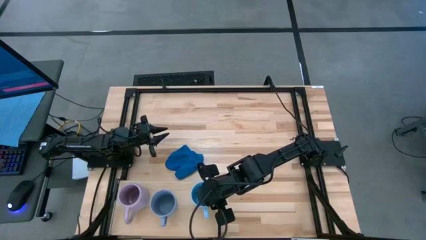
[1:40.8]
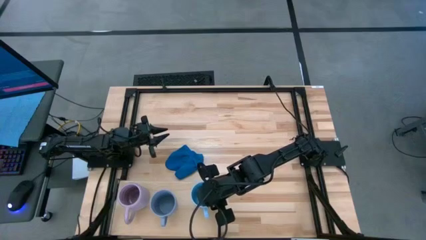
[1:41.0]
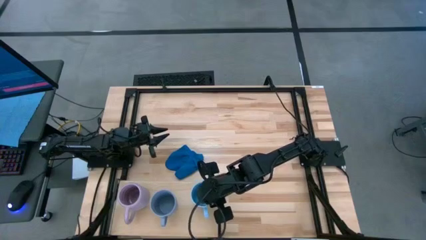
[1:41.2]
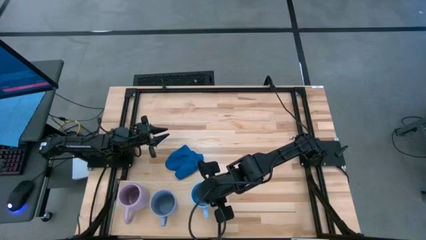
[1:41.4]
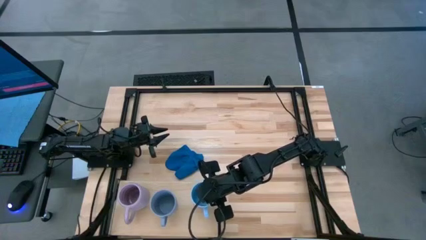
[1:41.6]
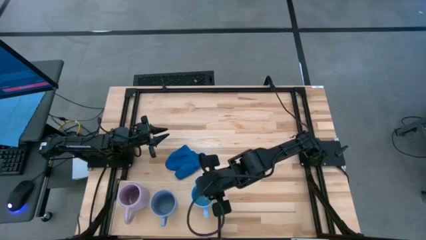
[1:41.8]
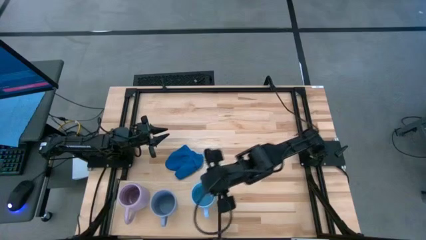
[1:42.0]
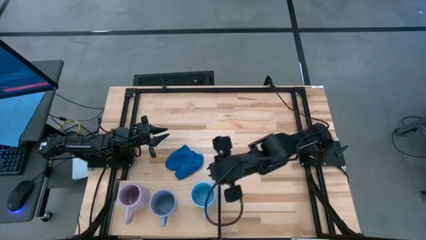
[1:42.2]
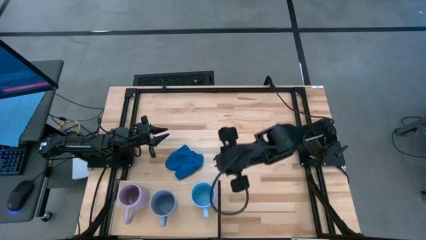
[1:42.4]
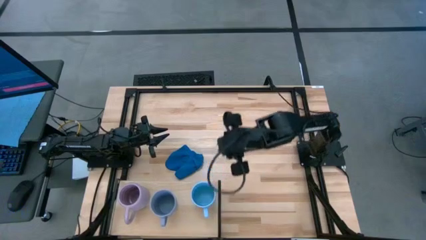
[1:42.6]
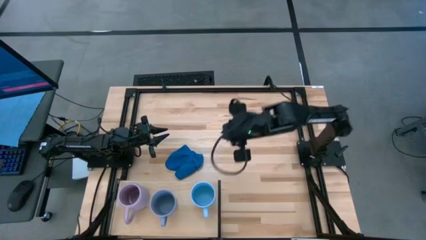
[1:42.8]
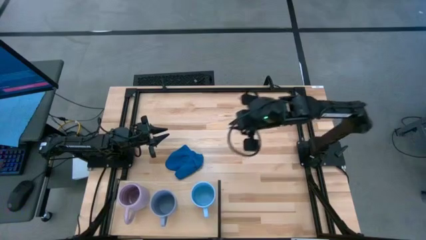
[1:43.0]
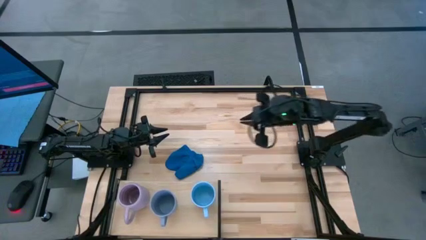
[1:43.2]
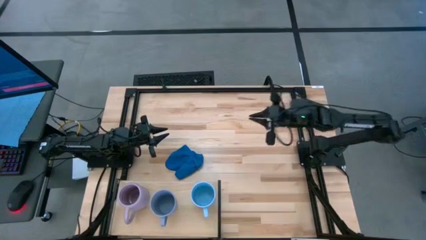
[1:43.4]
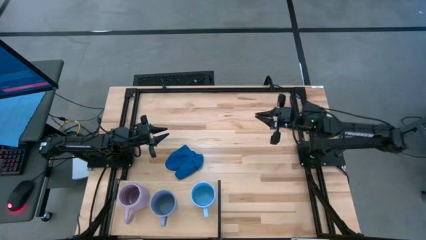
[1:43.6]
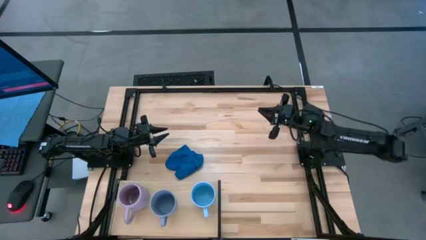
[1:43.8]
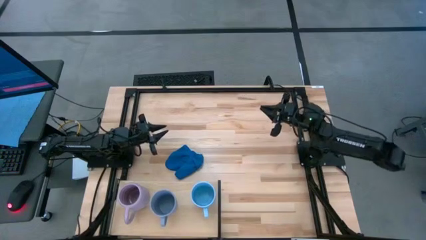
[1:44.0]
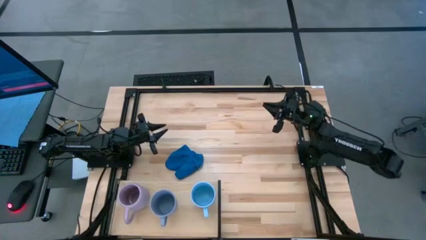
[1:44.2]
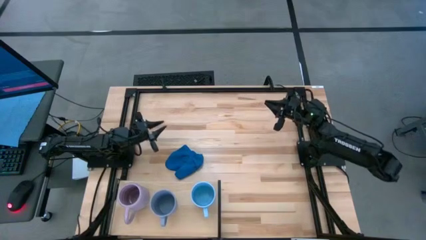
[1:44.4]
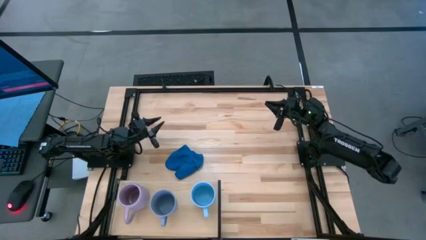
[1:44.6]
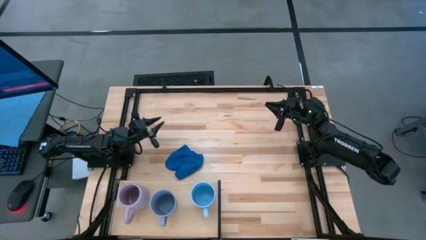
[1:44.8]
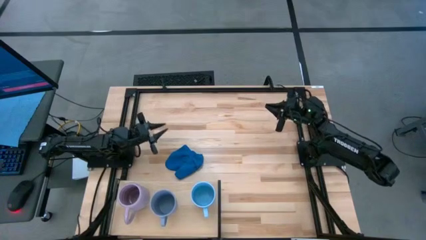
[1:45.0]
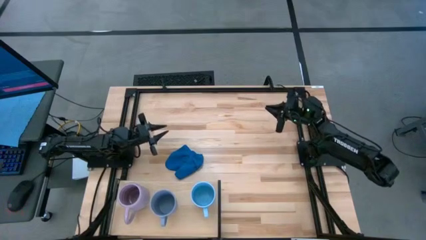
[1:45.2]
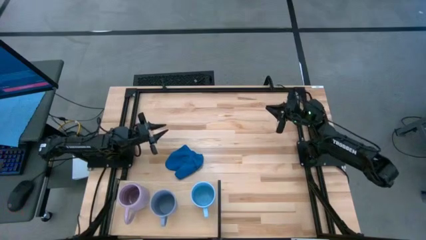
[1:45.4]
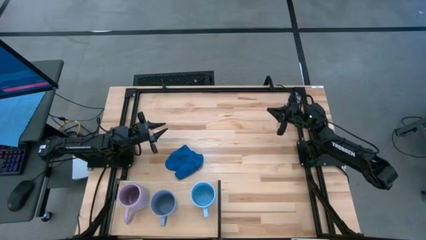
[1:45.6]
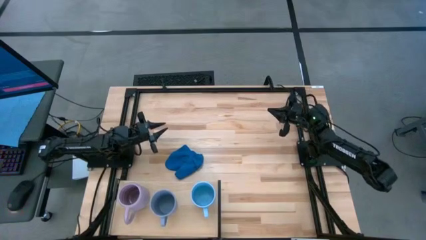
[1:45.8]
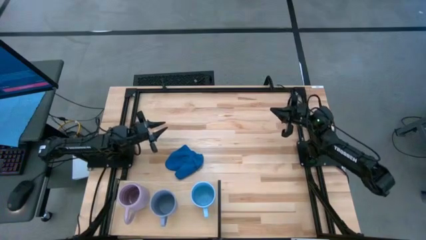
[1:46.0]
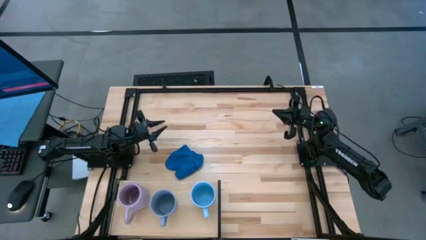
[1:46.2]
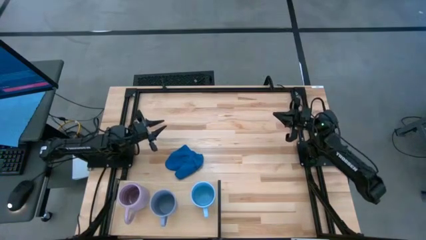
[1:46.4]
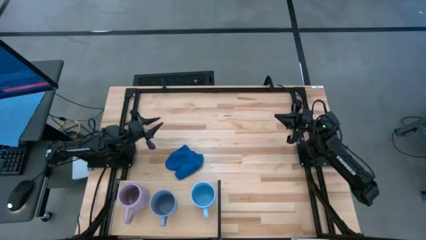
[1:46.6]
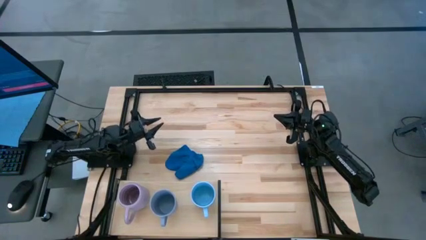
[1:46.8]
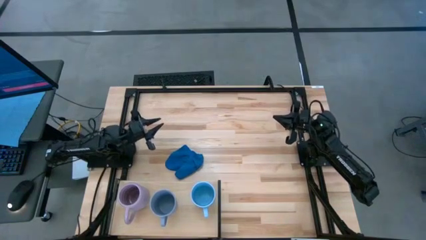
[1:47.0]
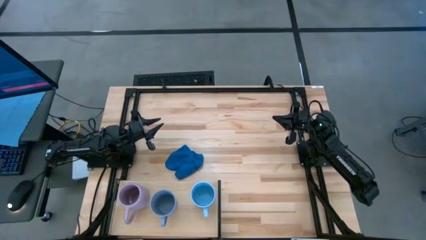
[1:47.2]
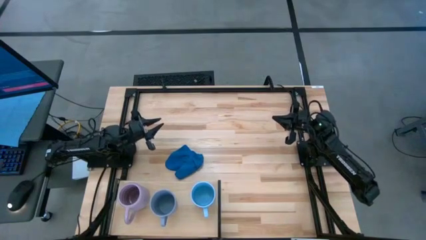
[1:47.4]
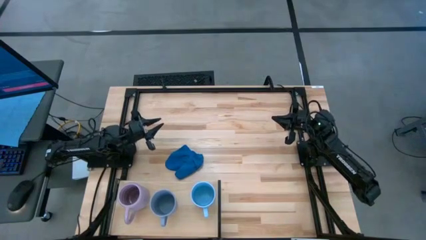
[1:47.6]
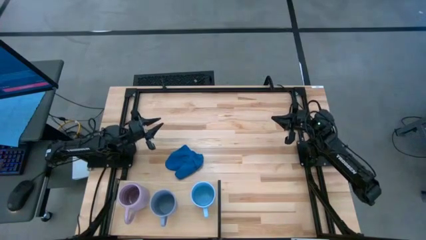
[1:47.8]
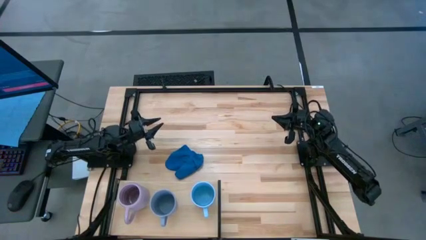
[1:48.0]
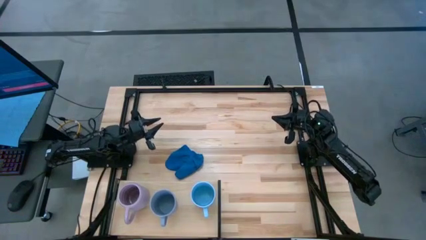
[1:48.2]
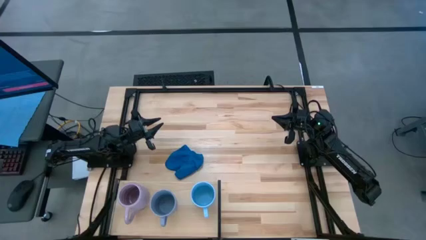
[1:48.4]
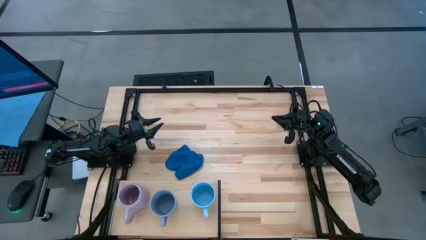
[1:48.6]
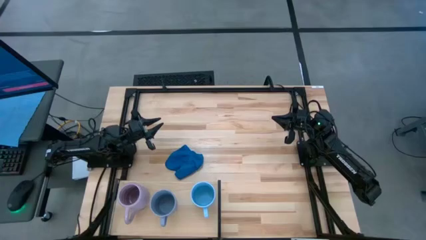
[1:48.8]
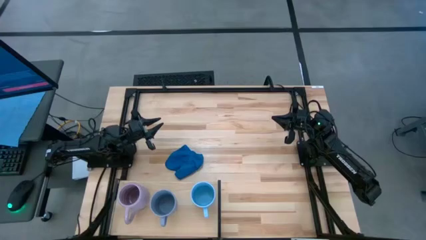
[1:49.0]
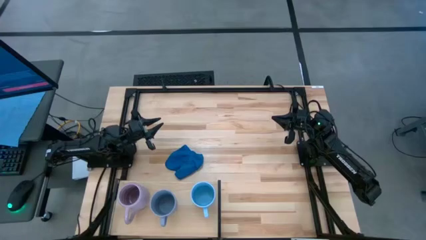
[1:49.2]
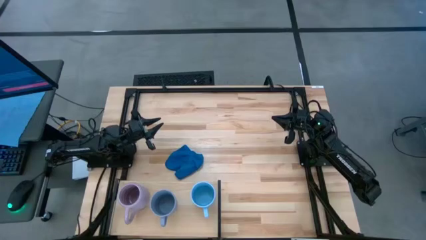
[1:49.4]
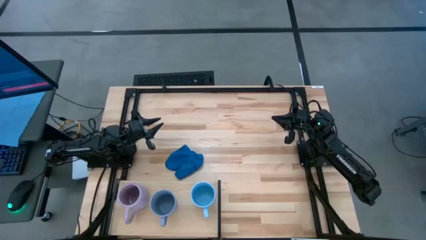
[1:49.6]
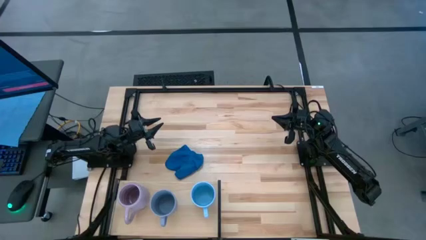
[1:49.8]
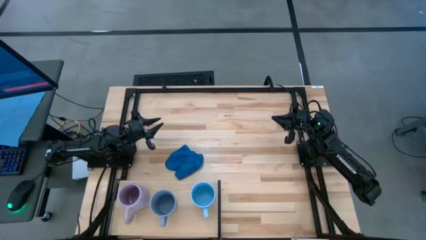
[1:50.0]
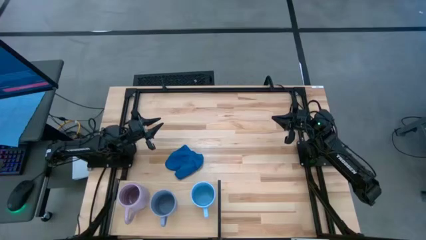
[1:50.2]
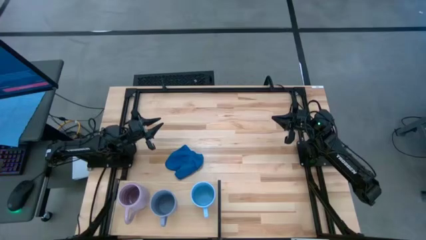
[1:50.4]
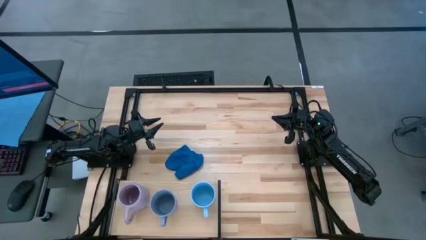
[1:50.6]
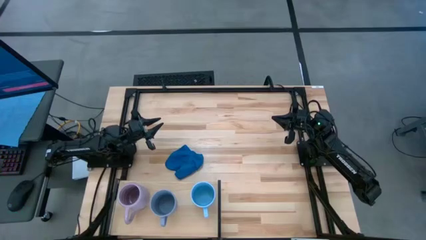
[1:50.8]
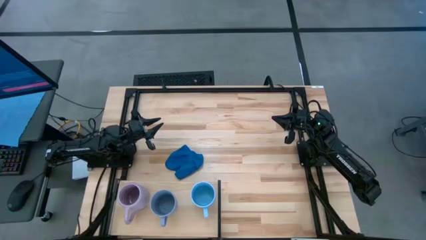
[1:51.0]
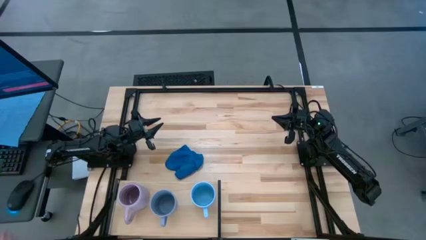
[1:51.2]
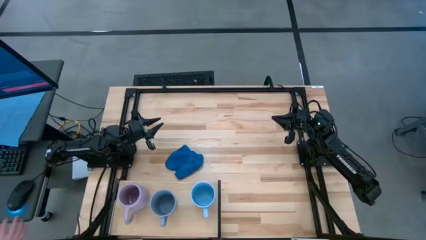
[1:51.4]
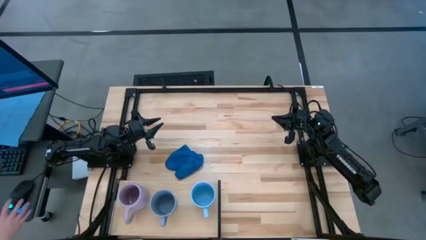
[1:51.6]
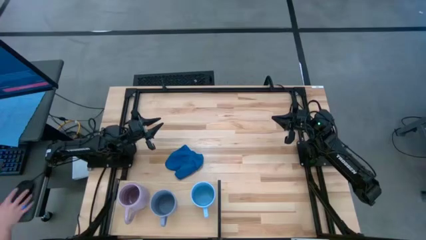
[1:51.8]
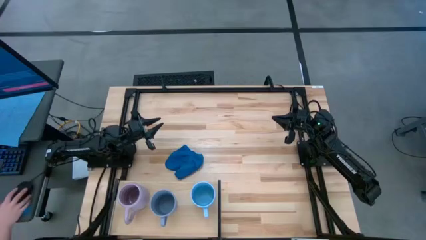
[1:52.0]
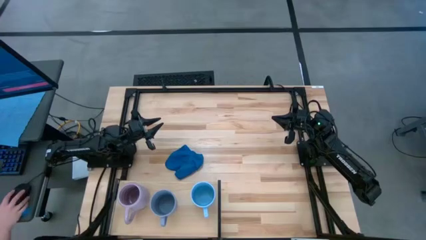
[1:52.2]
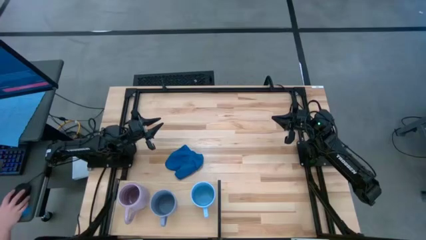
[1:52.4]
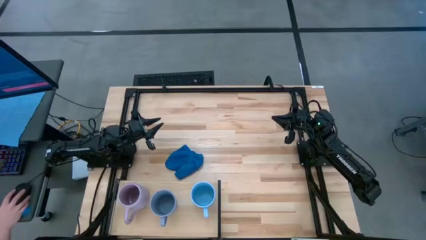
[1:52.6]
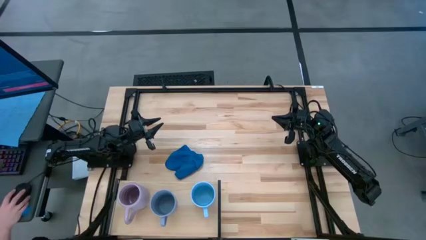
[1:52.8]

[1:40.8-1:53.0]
Task: Stack small to large cups/mugs on shelf
Return to Home Position

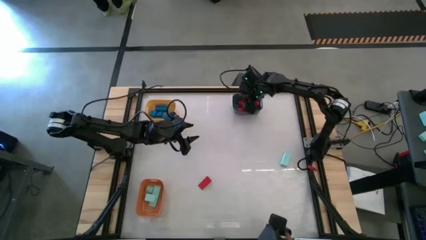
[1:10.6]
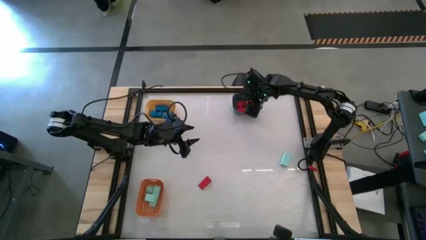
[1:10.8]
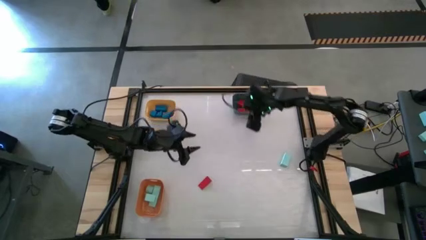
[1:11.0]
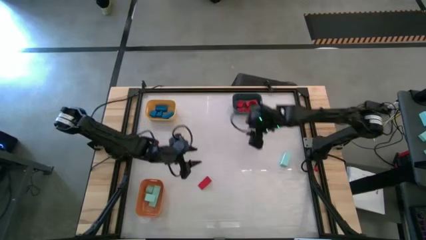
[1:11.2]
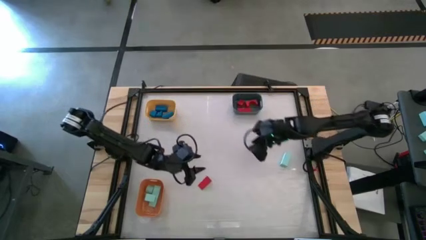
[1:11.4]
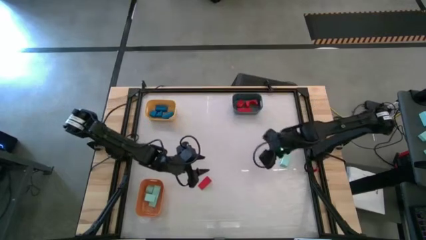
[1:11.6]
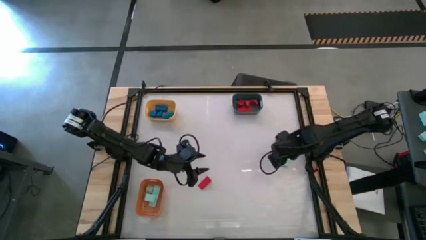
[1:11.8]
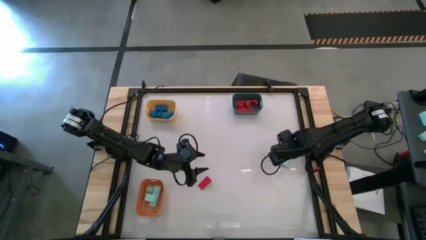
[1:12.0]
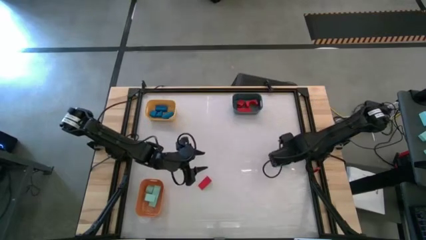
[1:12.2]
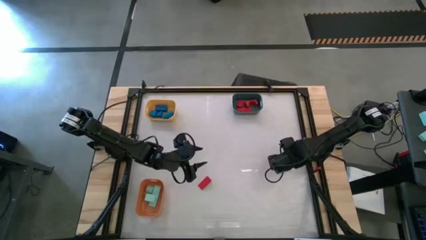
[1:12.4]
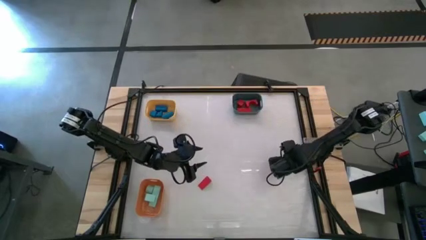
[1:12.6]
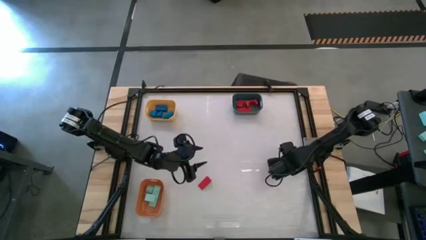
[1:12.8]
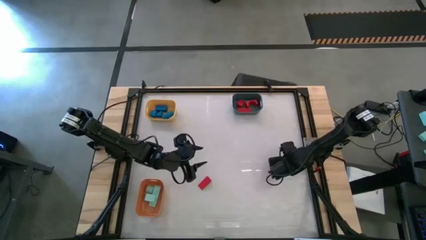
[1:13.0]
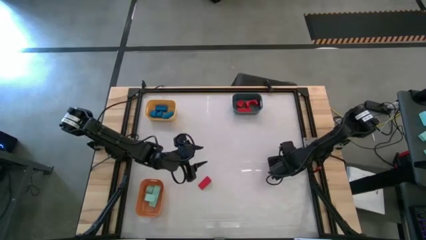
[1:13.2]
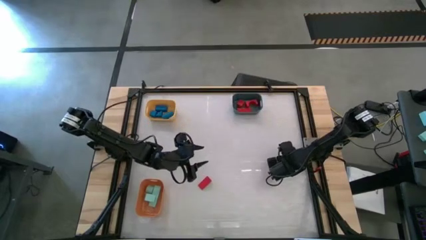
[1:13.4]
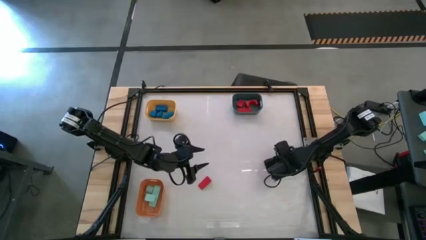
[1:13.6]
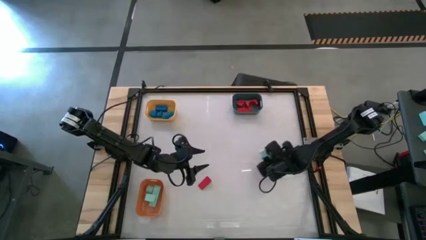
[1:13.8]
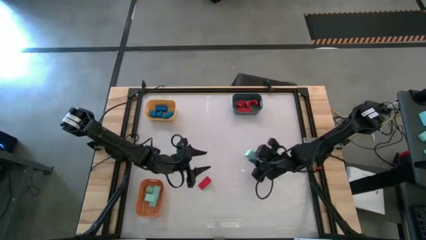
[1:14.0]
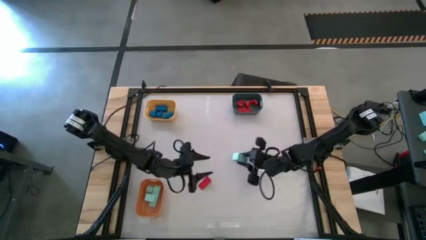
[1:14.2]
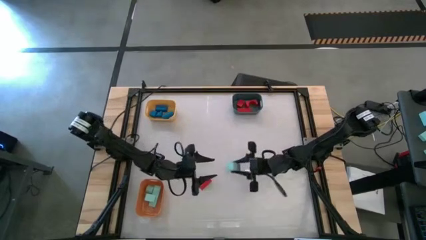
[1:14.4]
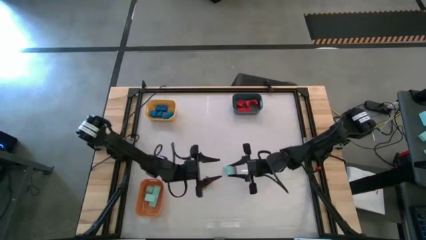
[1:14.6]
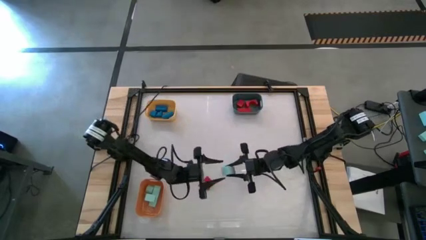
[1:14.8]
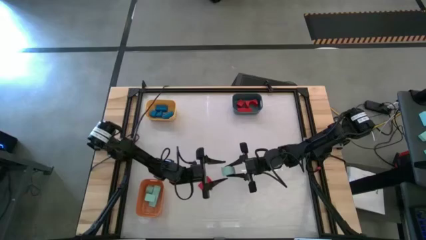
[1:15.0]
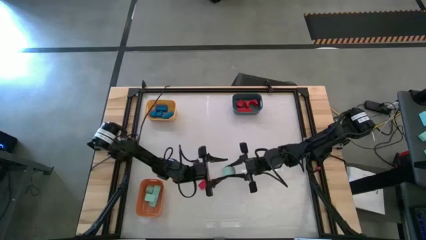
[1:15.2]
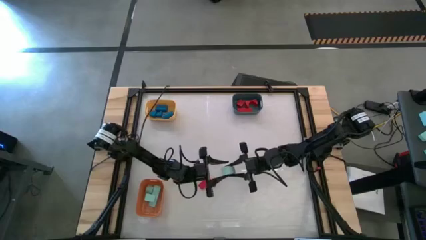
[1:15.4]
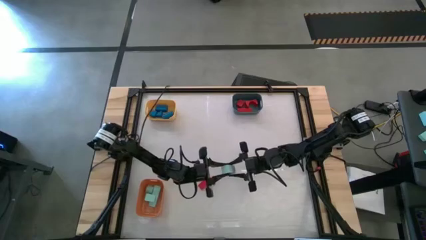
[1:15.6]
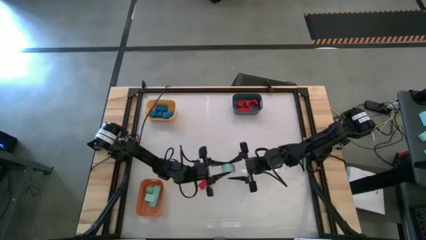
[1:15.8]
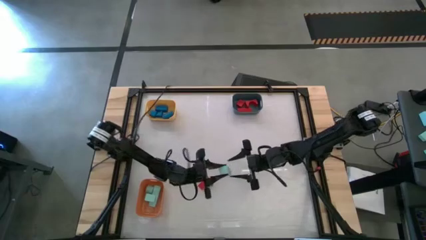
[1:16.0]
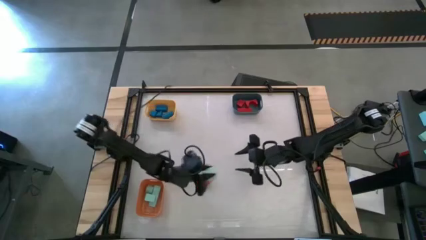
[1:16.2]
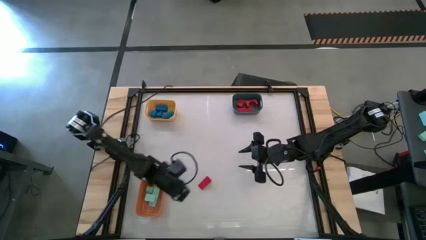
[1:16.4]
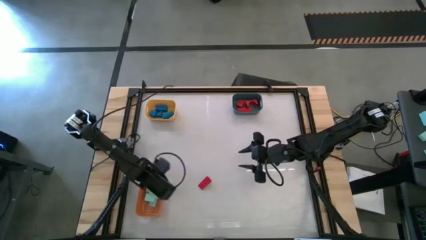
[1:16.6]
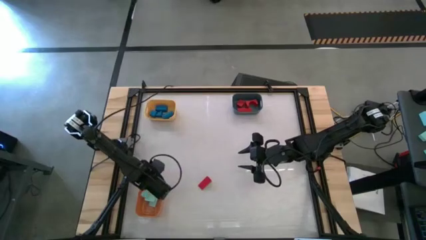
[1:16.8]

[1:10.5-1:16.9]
Task: Sort & place blocks by color
Put the light blue block into the orange bin
